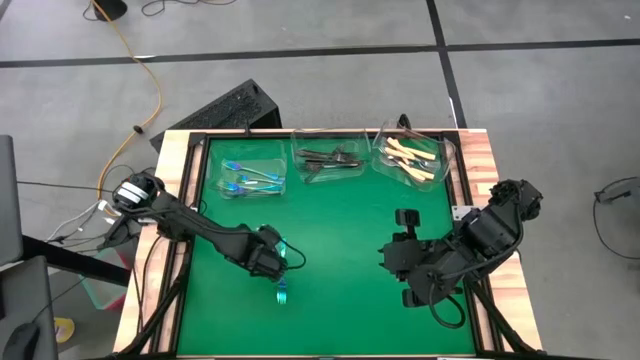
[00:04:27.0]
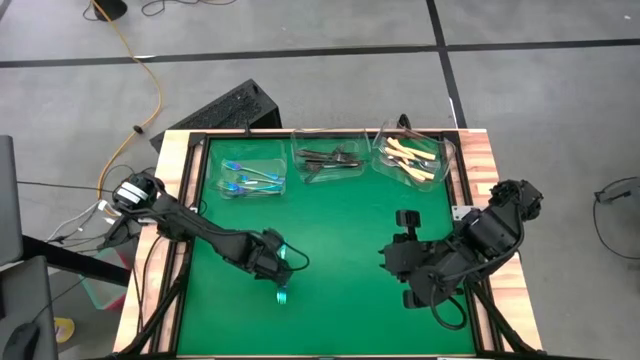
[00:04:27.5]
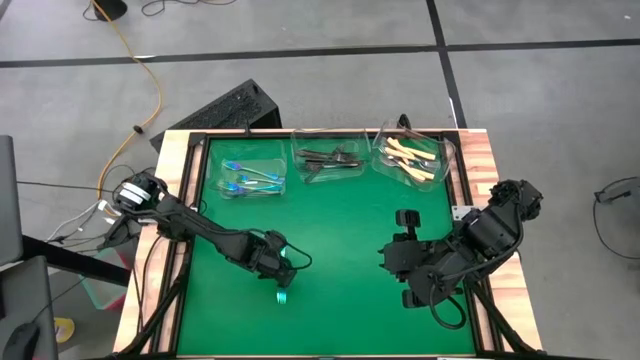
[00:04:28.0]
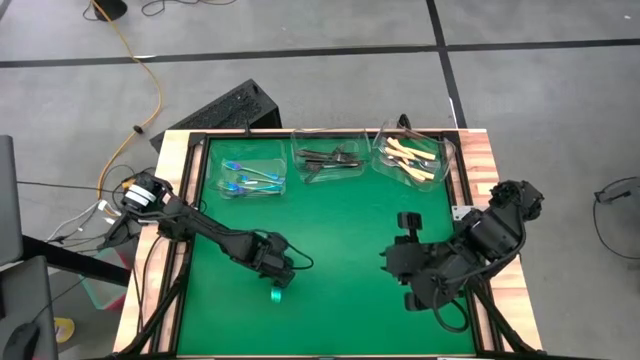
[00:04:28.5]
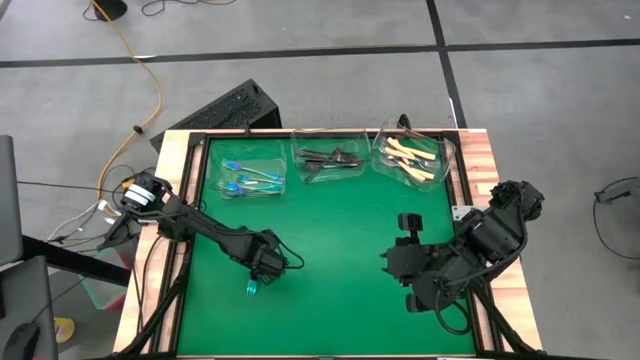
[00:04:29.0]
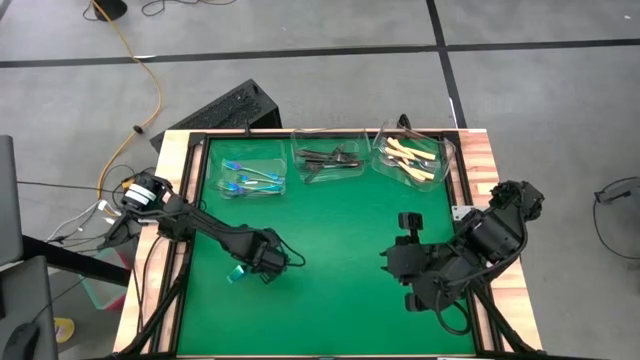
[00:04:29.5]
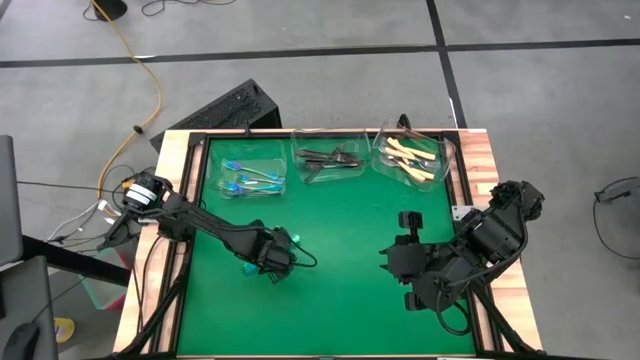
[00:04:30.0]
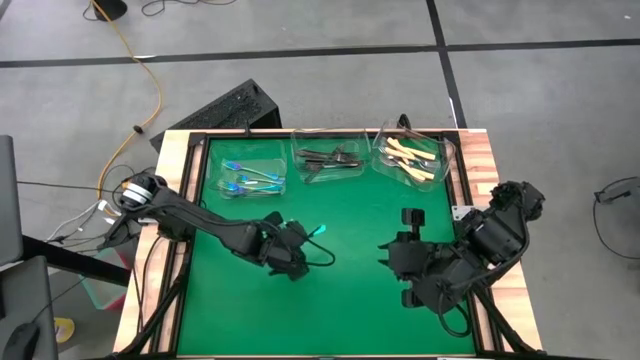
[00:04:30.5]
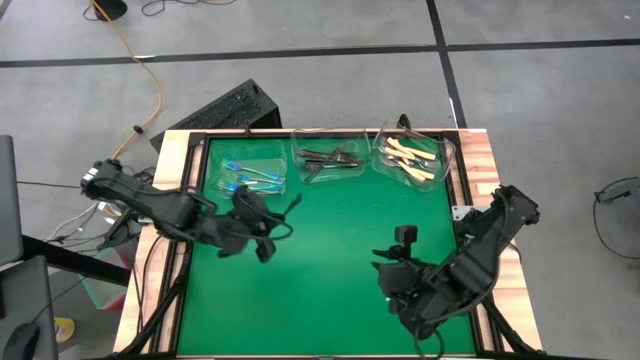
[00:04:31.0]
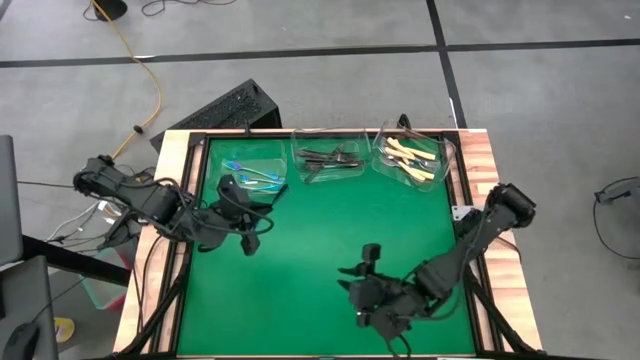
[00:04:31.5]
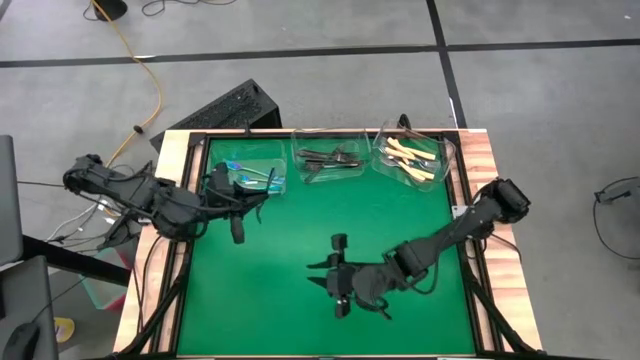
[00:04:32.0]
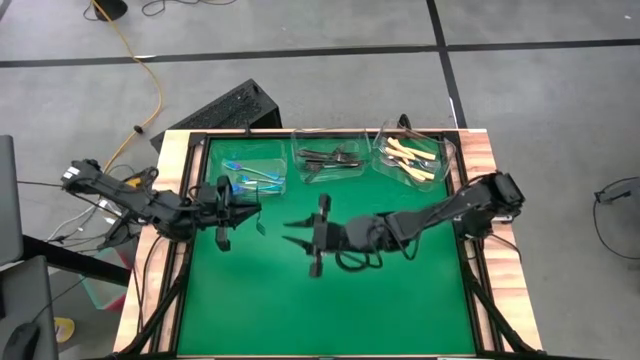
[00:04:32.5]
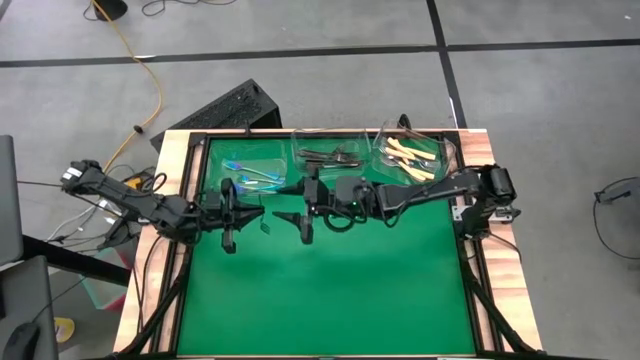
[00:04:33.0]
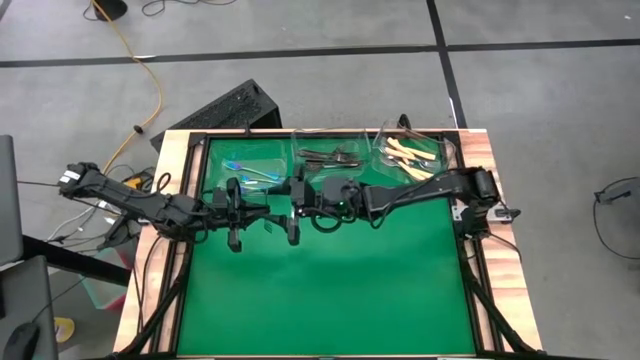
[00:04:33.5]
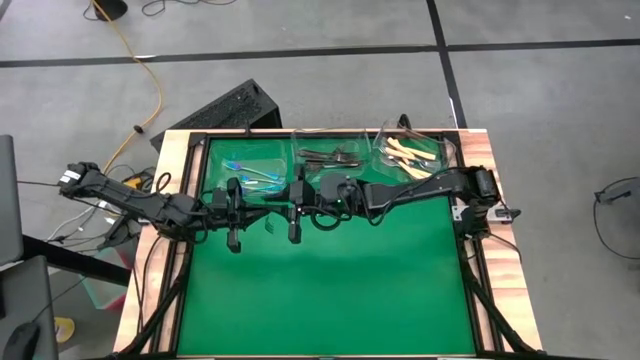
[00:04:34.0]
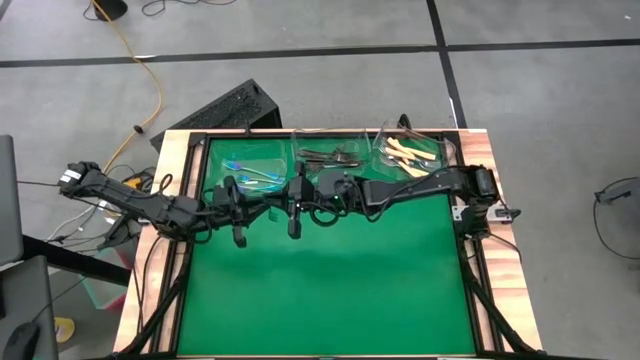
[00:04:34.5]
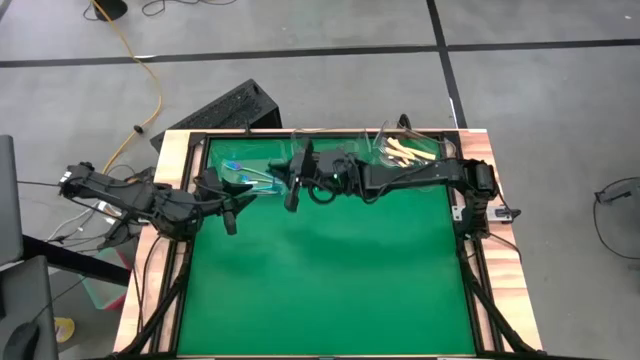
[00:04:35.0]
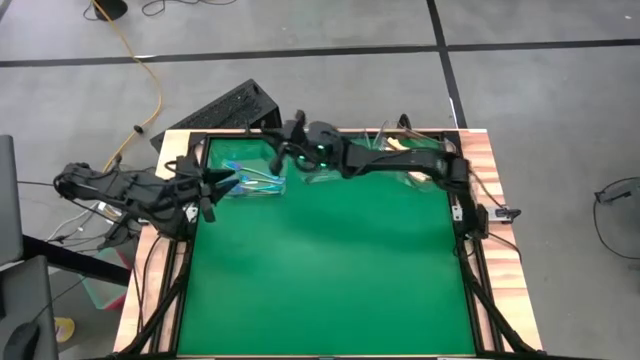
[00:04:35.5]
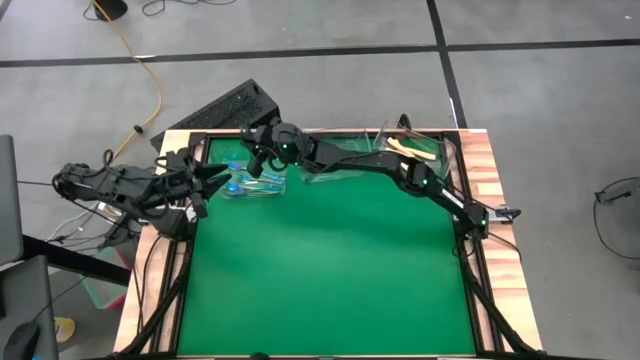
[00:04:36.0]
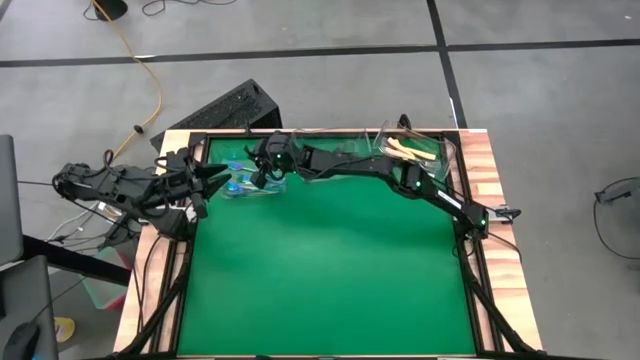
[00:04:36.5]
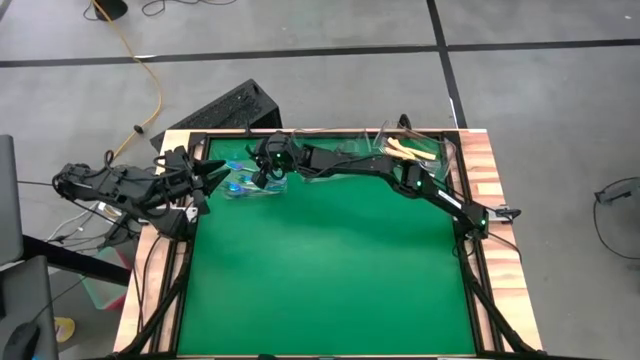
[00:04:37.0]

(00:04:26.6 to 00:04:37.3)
Task: Sort silverware by color (type)
Put the blue fork into the left transparent bin

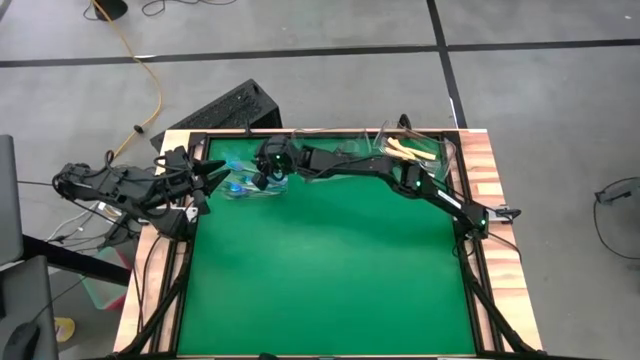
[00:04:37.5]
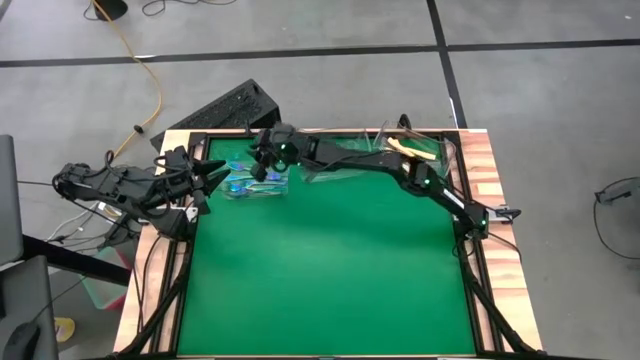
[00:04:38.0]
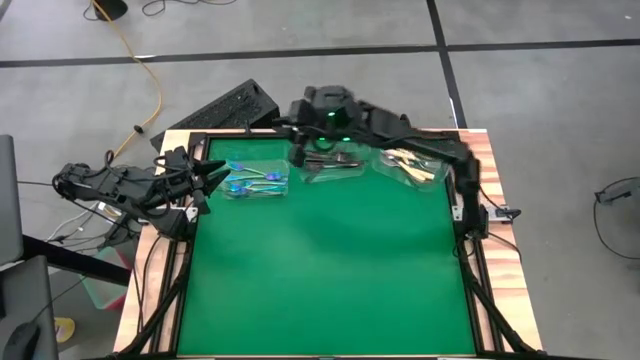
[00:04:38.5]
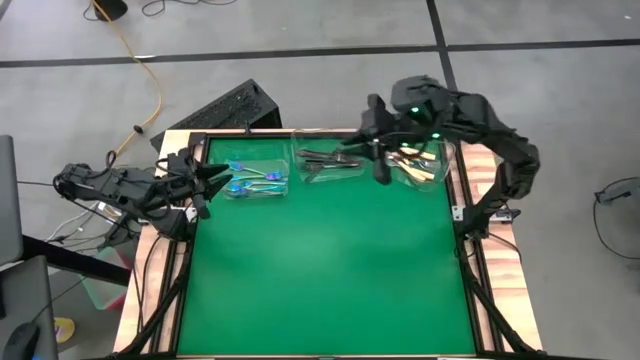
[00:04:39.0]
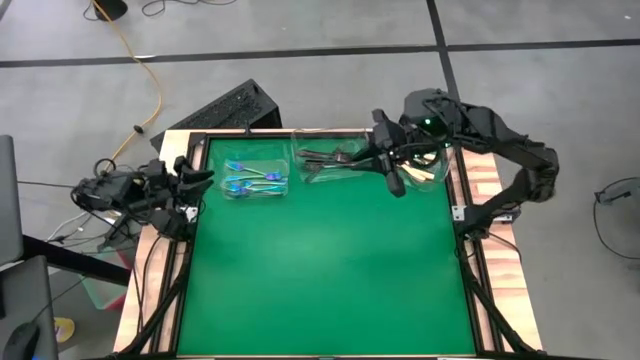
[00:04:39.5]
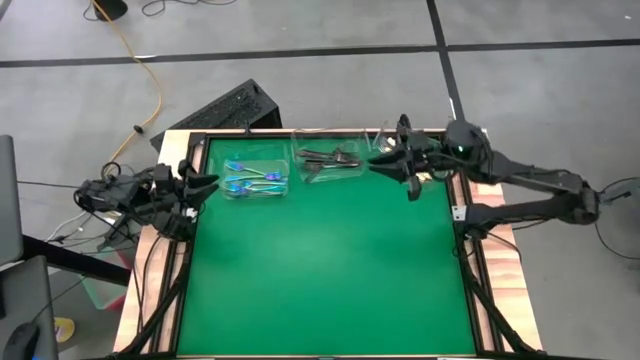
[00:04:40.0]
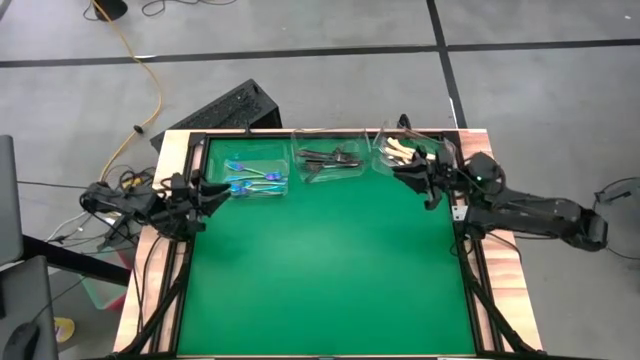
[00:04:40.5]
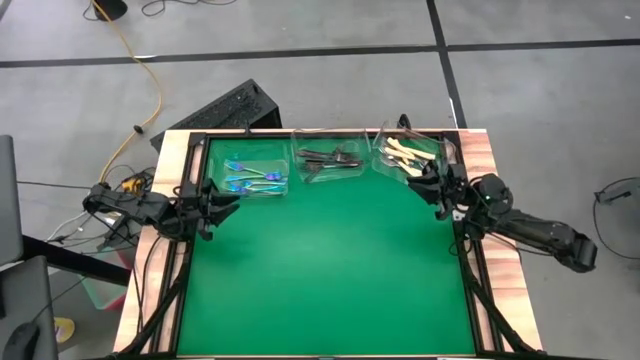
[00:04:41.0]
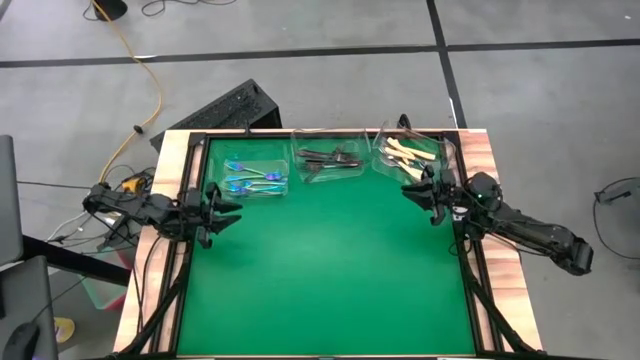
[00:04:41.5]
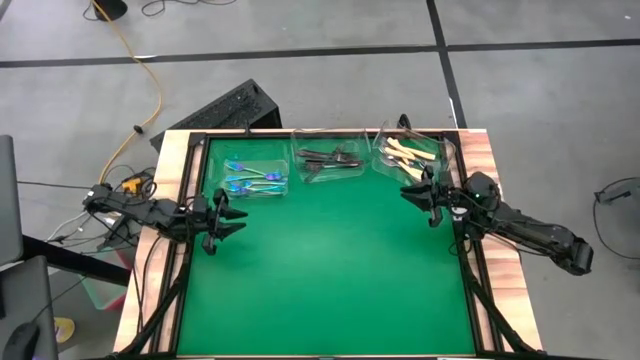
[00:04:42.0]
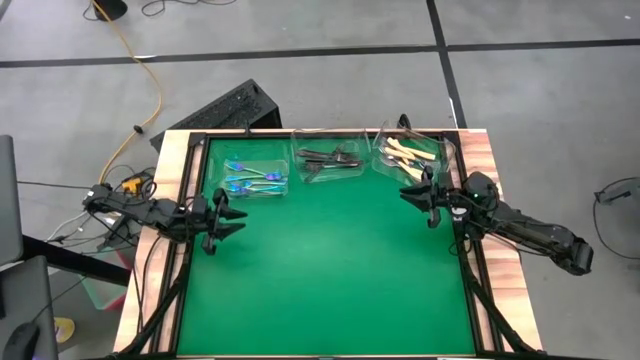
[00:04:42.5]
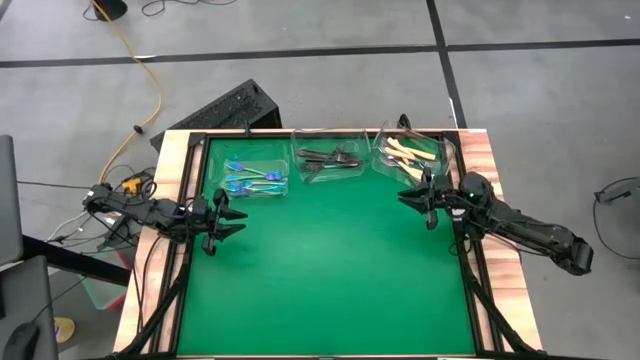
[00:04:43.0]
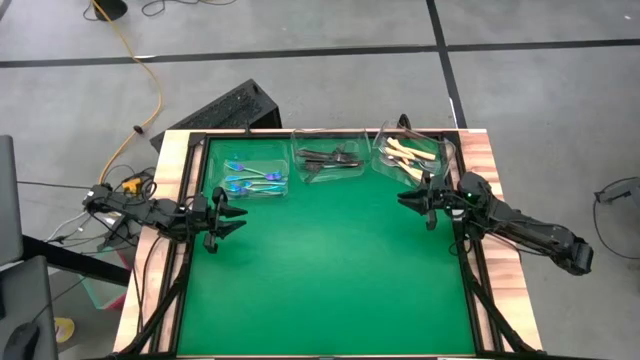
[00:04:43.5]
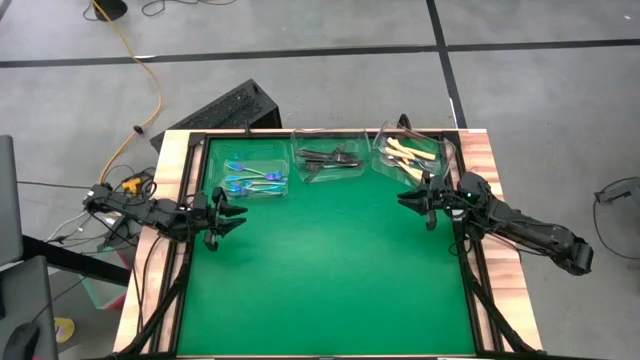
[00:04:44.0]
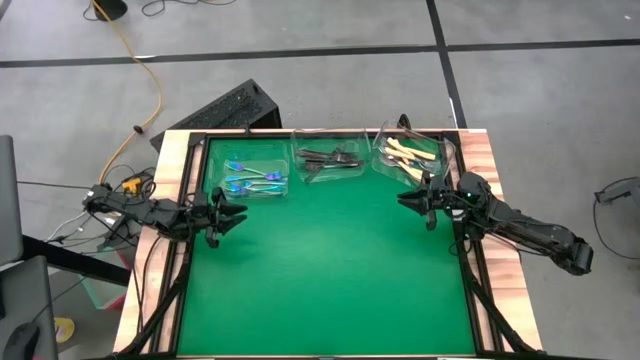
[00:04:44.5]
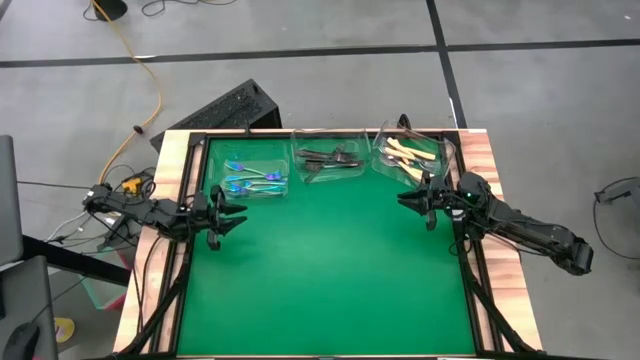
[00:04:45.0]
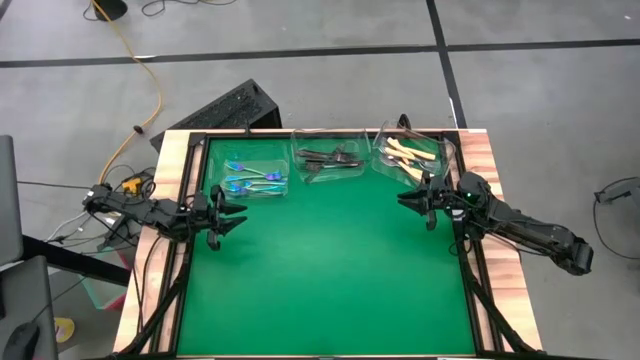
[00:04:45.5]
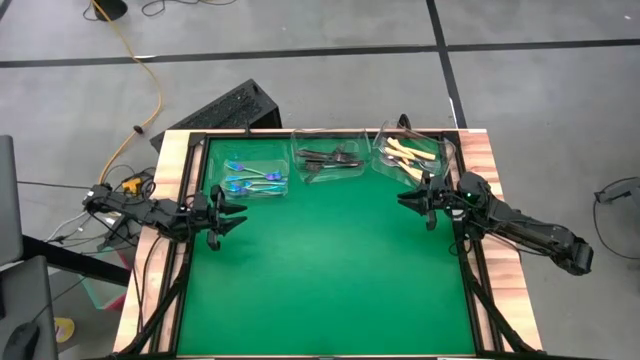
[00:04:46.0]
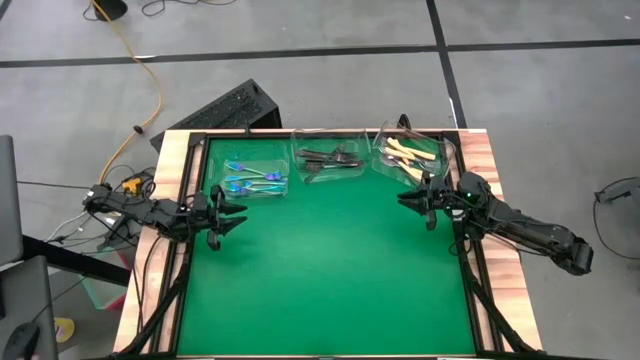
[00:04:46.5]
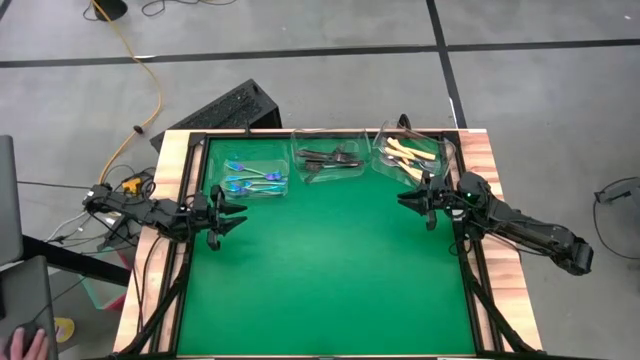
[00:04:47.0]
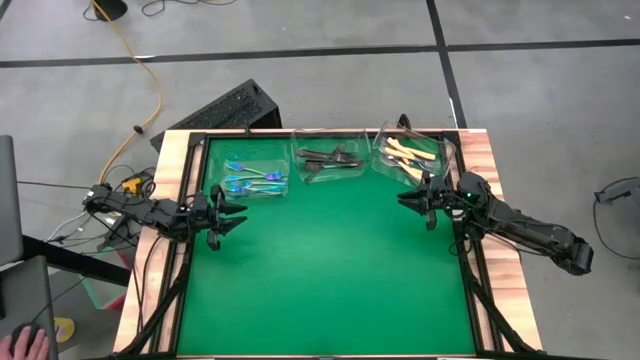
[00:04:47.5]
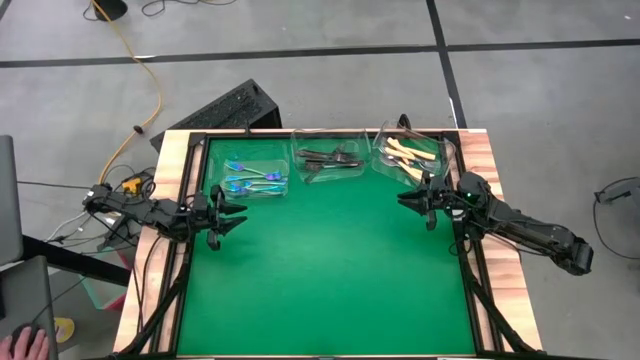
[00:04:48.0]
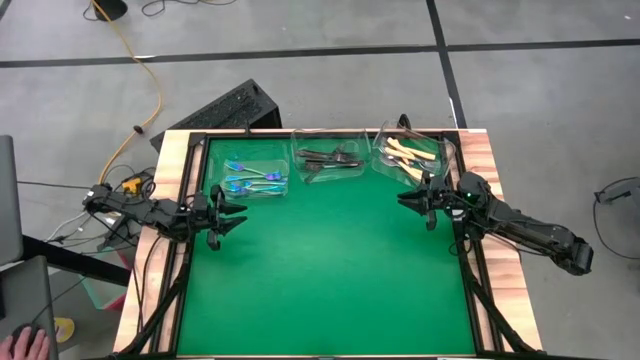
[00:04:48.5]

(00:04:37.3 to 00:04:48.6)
Return to Home Position
